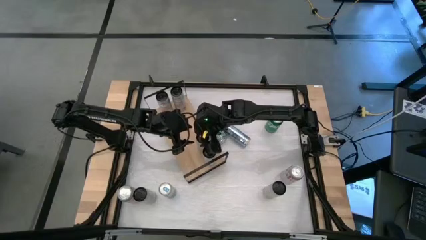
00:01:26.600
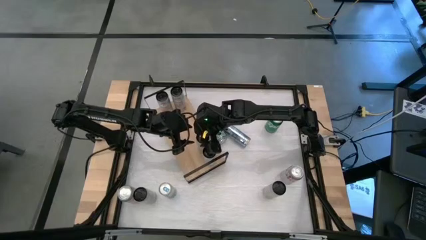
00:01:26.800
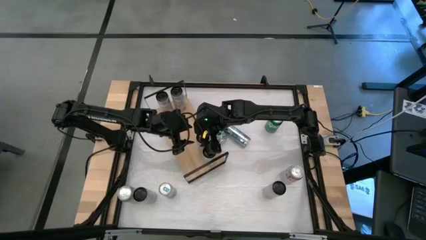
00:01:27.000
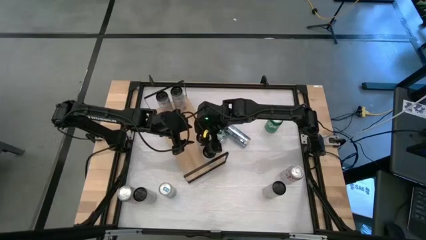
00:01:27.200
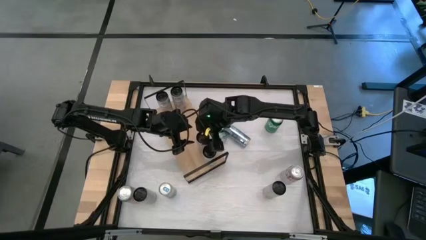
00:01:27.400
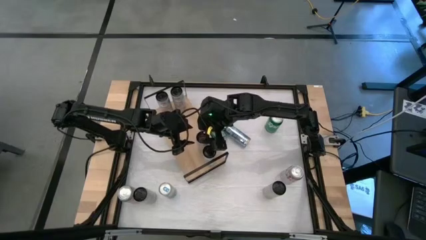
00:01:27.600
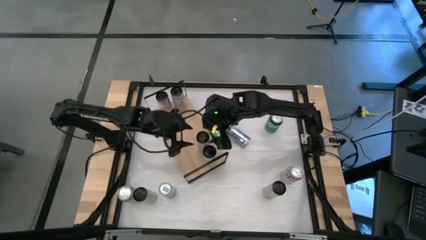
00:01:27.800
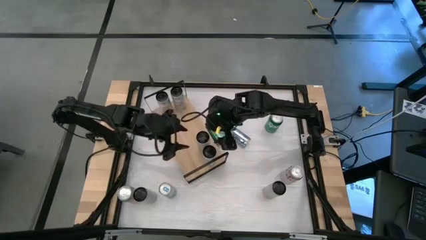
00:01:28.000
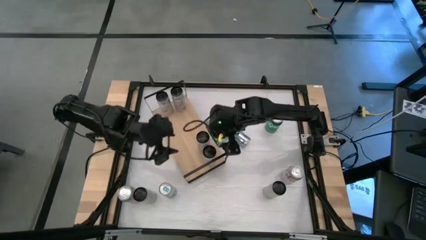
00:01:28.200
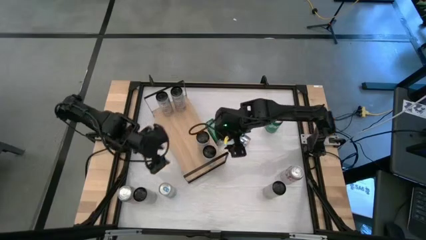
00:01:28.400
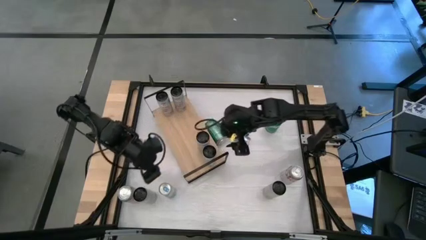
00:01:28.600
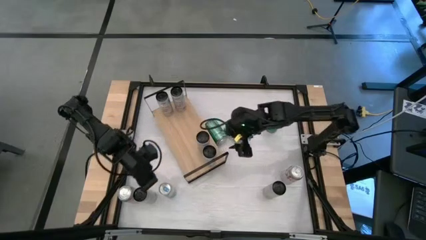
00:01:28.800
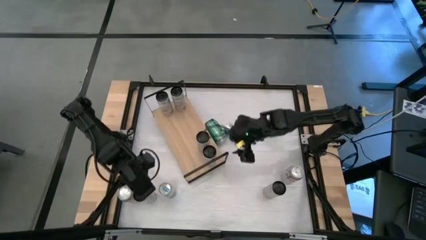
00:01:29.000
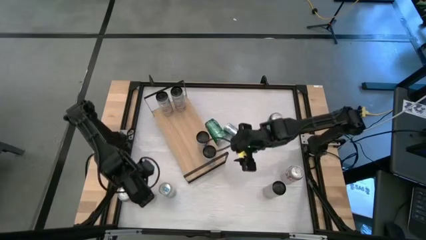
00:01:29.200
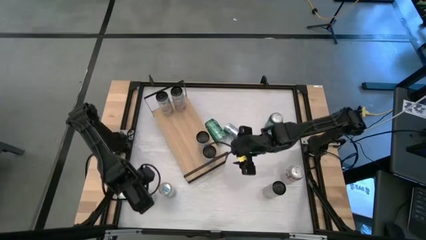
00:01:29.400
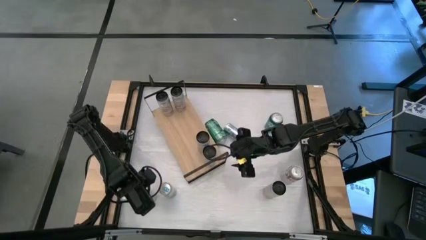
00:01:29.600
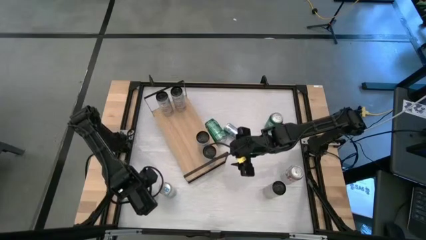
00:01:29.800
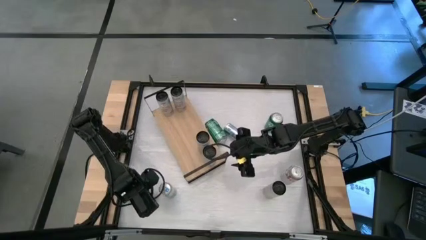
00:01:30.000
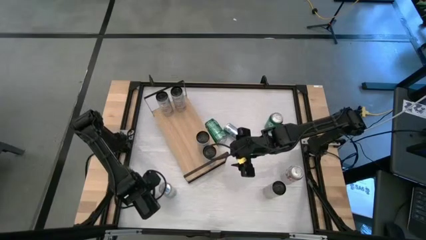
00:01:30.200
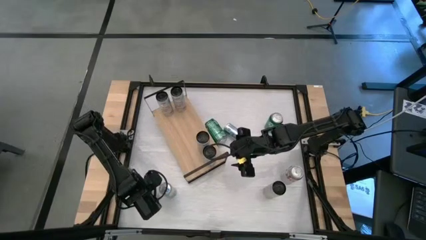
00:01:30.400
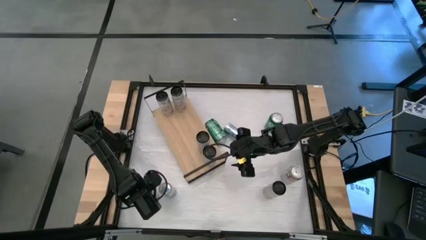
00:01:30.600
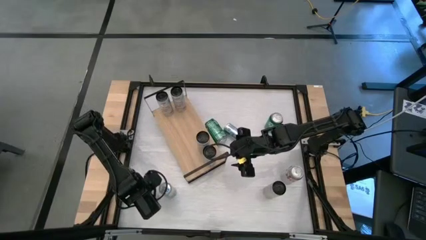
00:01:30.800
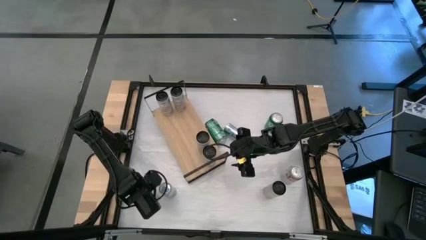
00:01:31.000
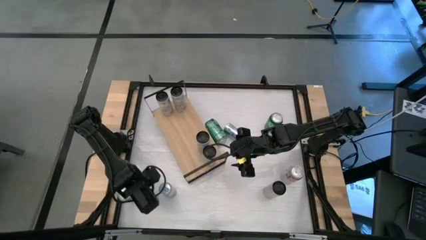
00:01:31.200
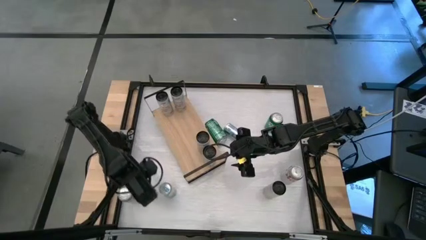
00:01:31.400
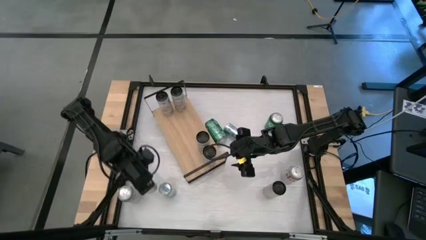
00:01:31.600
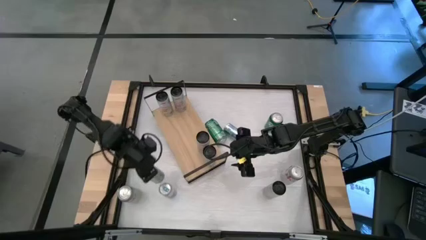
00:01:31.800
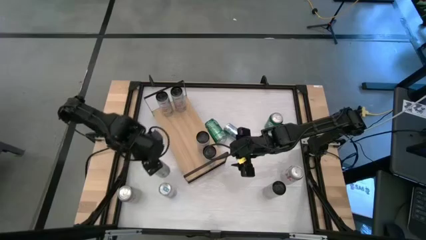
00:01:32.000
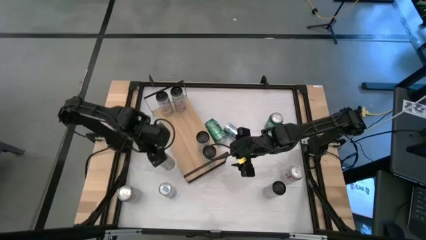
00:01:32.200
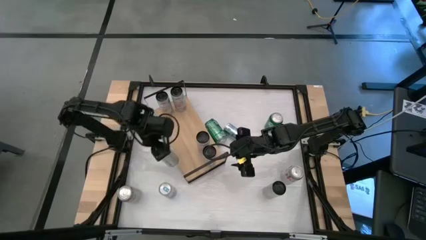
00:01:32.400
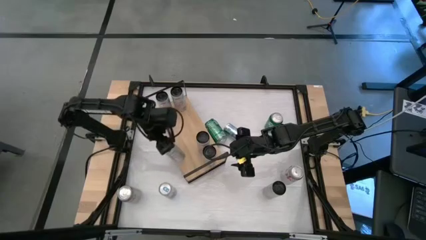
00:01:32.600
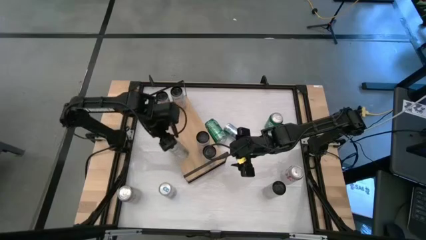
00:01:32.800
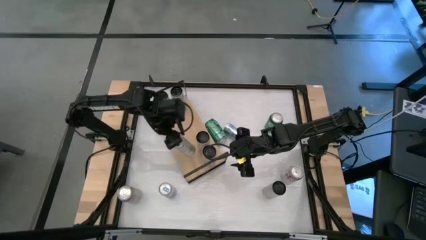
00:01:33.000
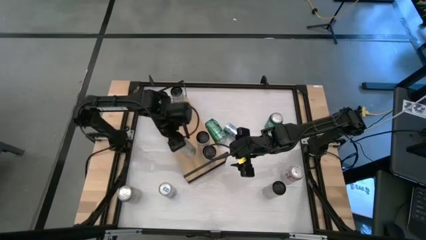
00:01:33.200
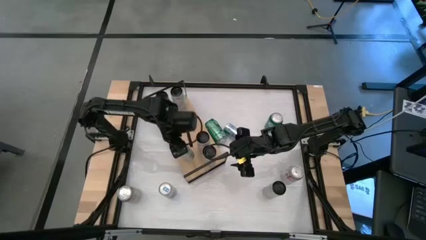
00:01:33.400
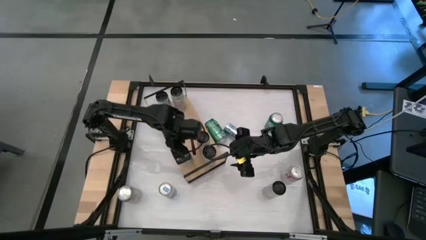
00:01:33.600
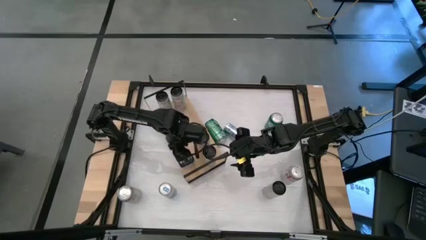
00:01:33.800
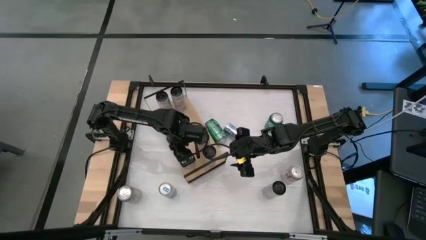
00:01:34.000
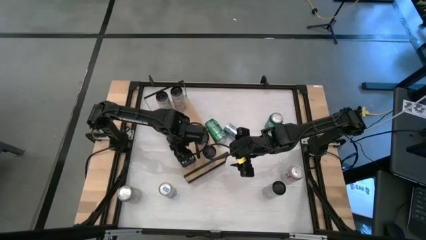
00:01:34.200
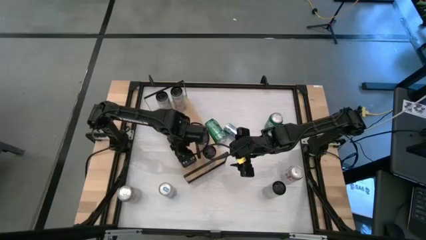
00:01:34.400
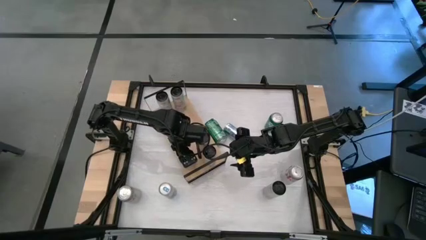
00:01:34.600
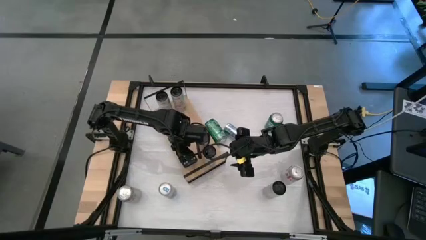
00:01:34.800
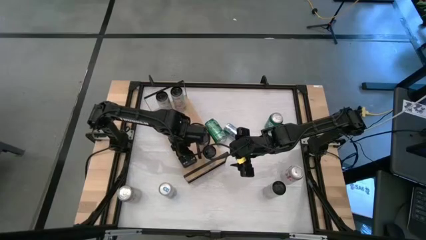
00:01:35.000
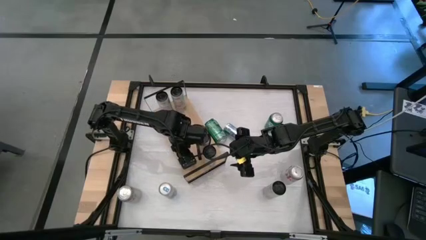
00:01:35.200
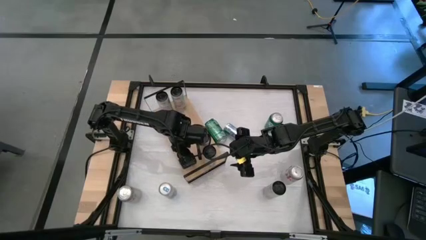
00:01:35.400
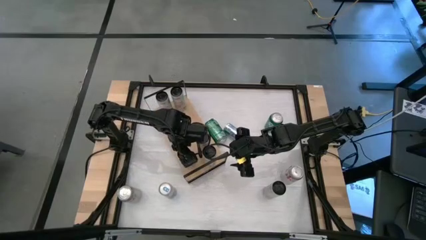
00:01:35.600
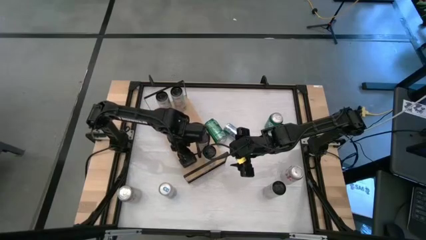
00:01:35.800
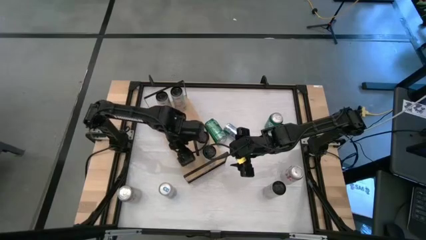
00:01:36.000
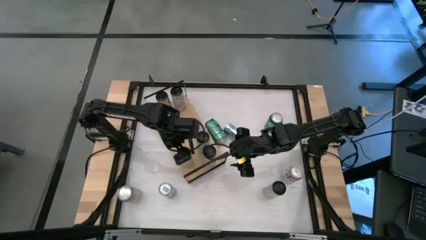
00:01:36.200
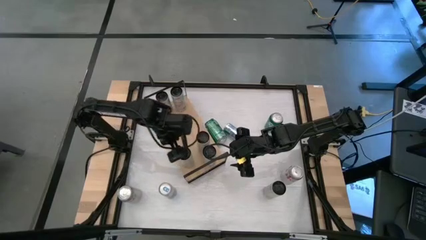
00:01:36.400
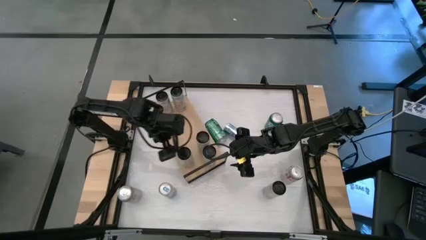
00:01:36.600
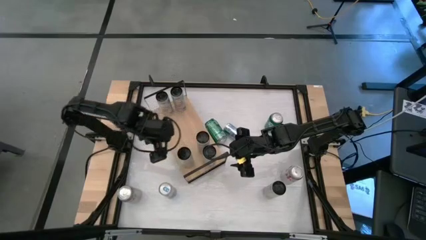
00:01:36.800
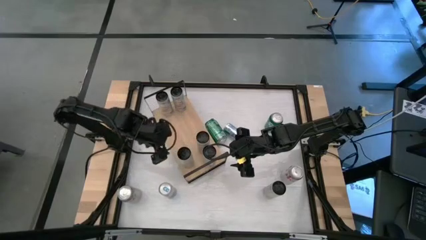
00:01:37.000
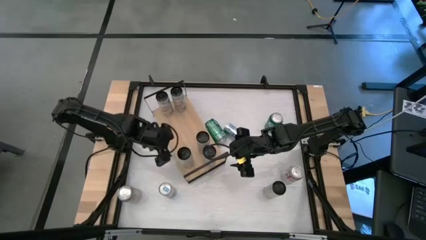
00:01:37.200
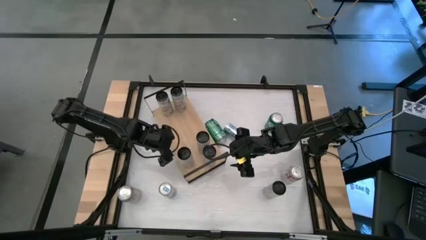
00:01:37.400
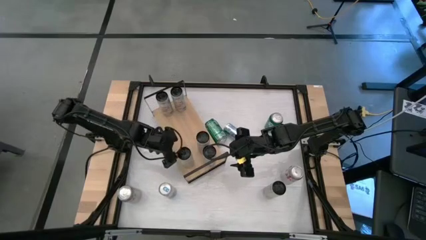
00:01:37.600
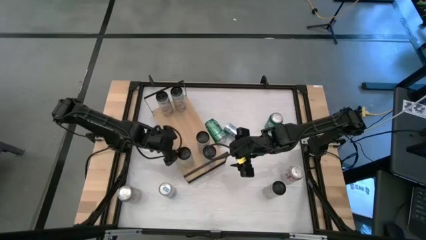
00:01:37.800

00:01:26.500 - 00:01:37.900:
Task: Place canned beverage on shelf
Put the white yellow soda on the shelf aligned with the other white yellow soda cans

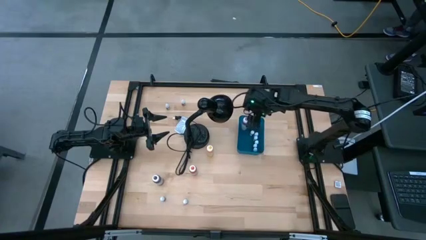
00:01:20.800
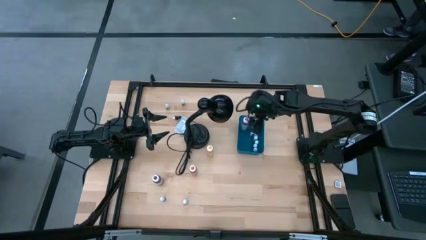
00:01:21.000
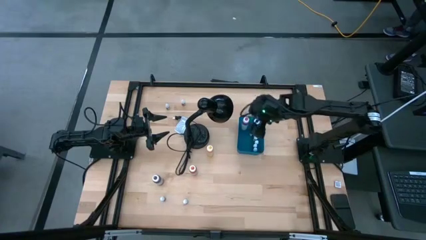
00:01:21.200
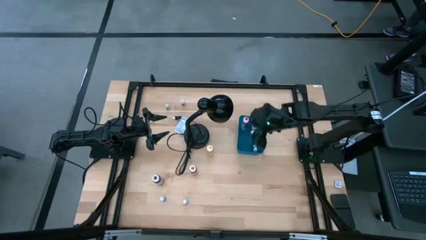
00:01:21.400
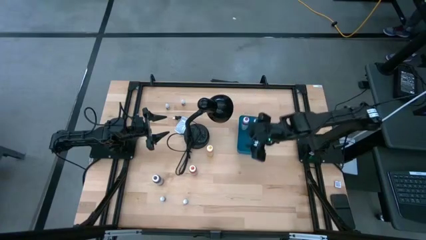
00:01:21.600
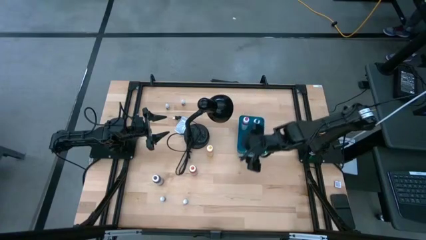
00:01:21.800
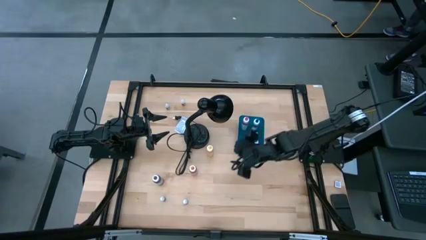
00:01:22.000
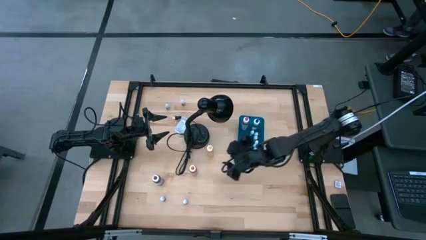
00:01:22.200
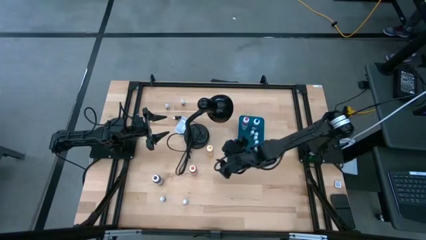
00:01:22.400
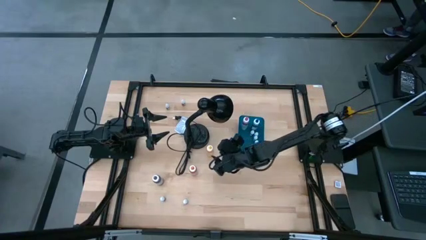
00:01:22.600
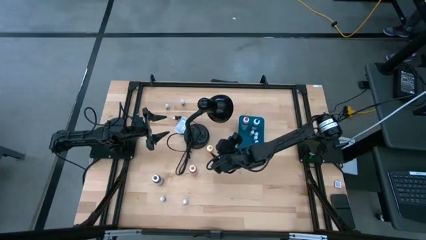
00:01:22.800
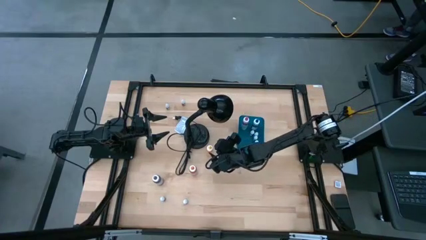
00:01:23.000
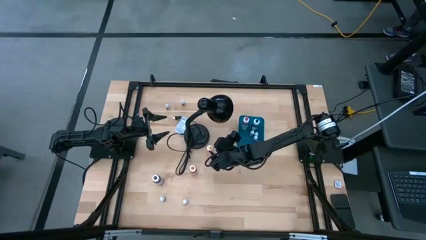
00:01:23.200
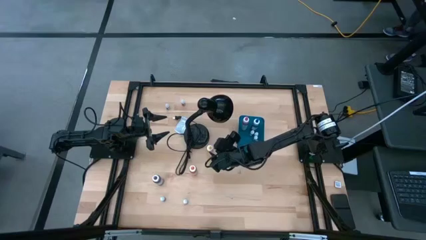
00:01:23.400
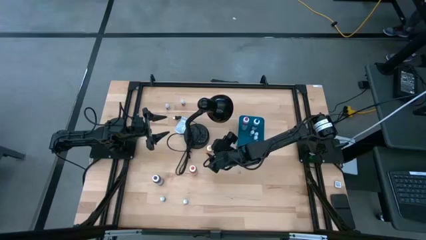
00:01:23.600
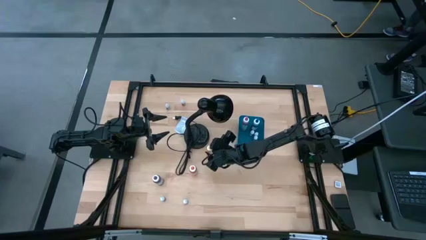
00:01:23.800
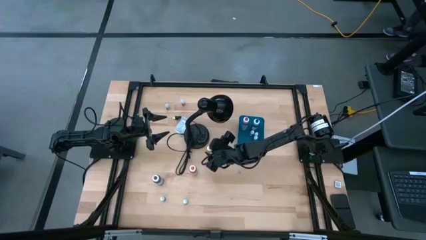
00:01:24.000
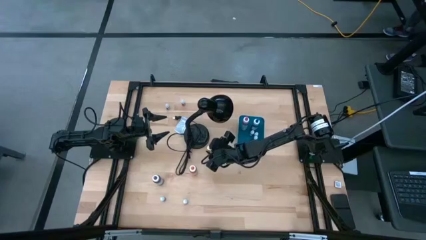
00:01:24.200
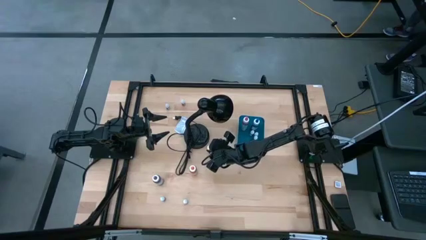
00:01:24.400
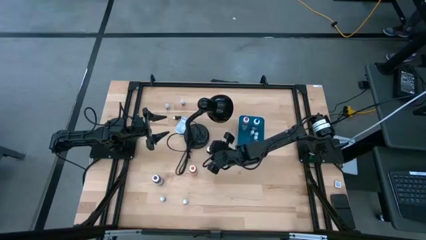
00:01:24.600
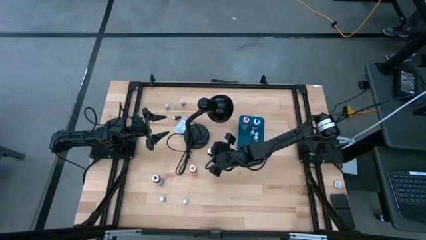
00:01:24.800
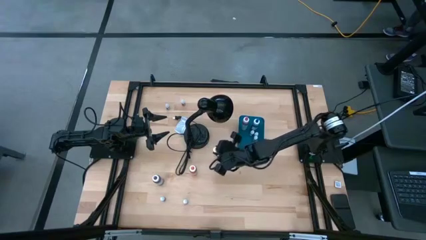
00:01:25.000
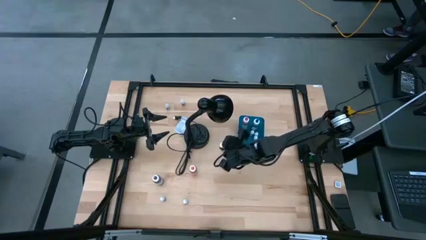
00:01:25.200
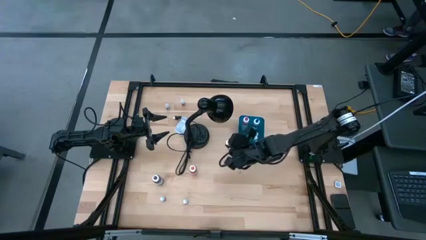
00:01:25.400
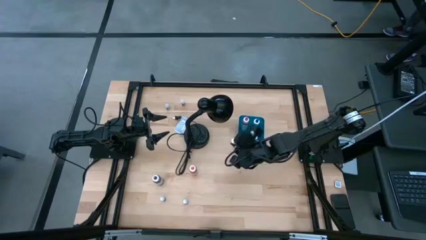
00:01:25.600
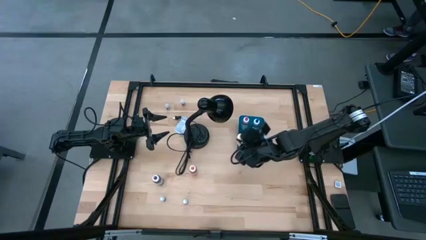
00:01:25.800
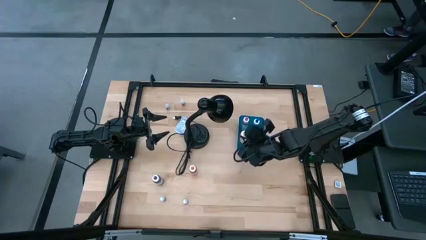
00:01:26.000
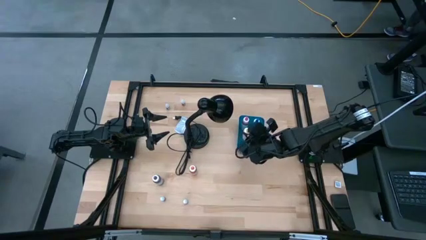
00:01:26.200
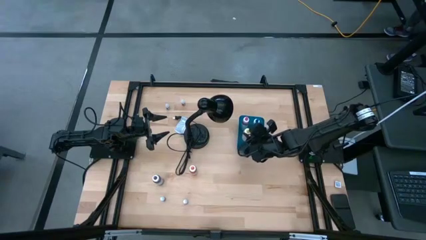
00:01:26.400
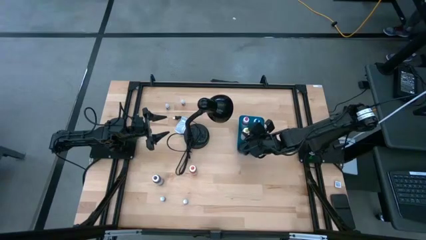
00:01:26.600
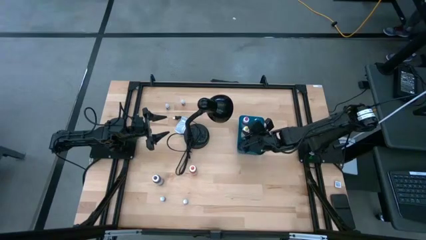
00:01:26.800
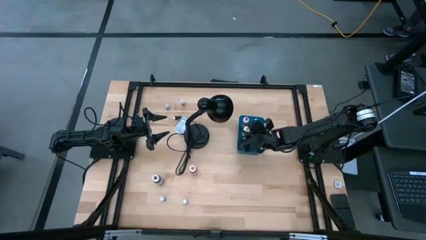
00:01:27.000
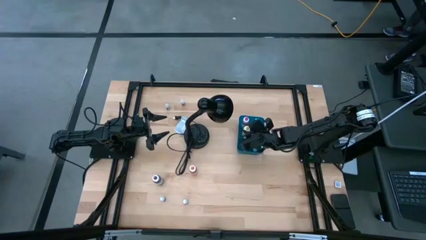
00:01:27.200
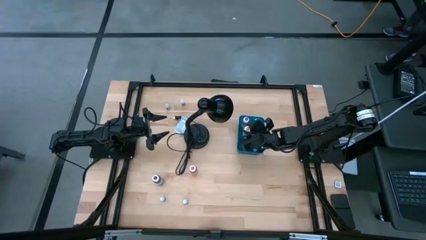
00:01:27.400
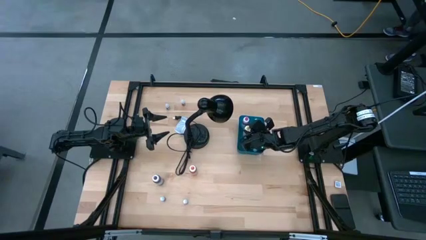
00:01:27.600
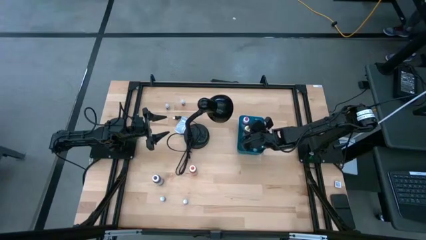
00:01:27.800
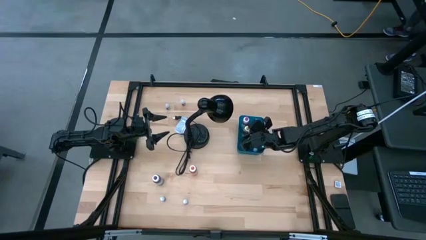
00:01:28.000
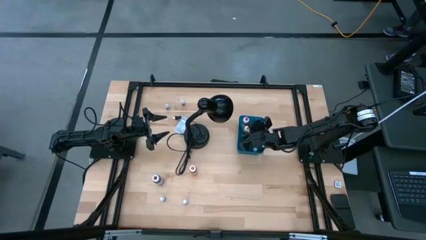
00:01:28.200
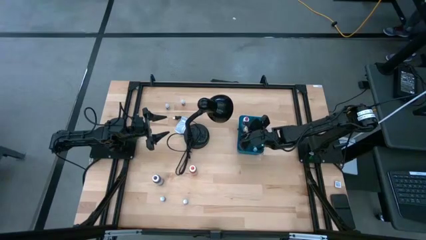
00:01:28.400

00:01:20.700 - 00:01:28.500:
Task: Pick & Place food coloring
Put the large yellow food coloring bottle into the blue bin
